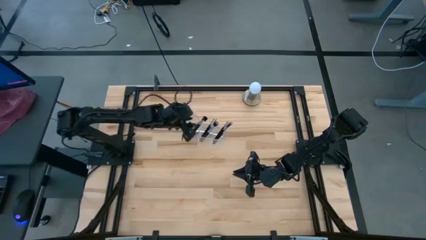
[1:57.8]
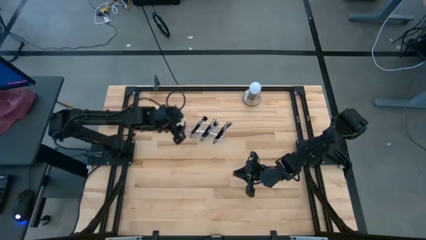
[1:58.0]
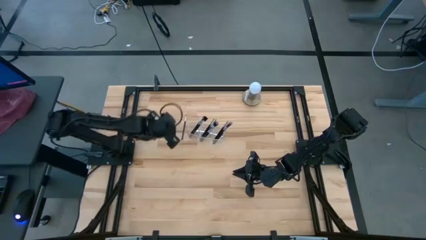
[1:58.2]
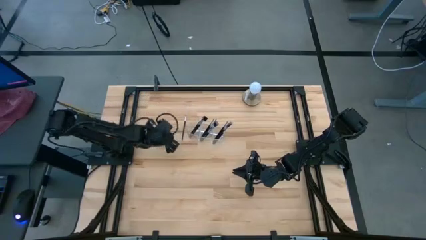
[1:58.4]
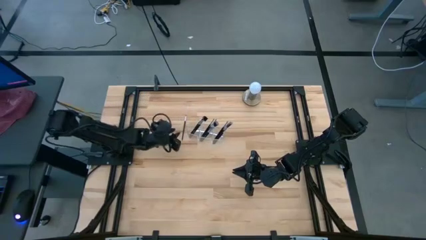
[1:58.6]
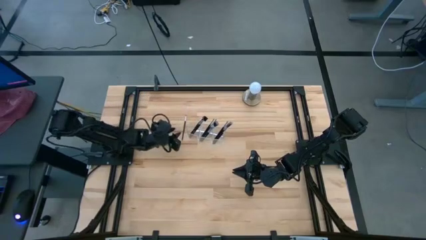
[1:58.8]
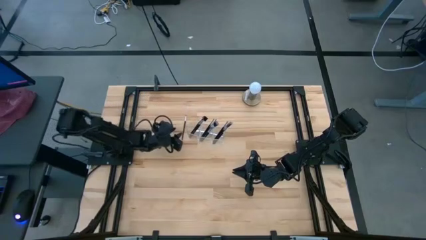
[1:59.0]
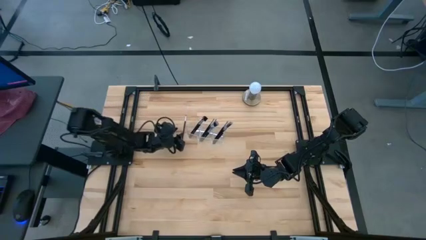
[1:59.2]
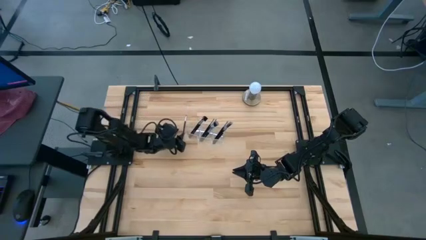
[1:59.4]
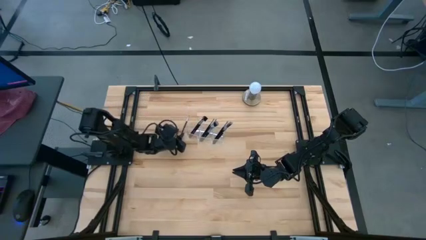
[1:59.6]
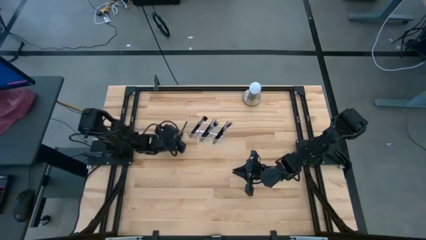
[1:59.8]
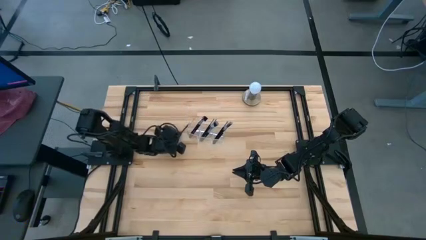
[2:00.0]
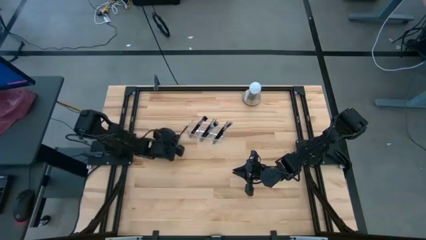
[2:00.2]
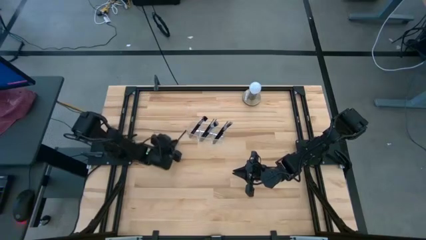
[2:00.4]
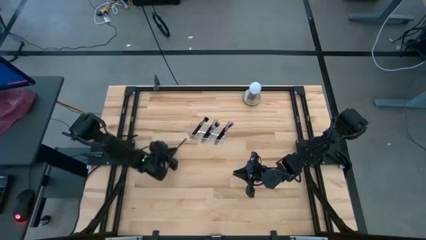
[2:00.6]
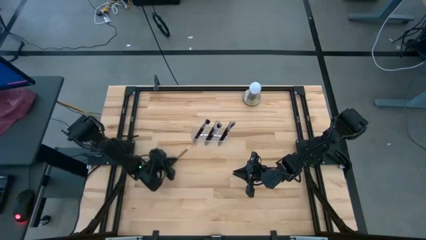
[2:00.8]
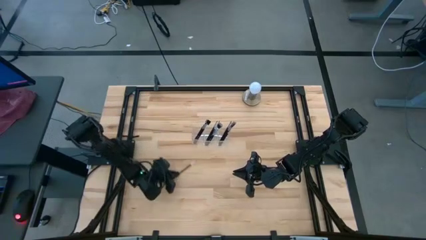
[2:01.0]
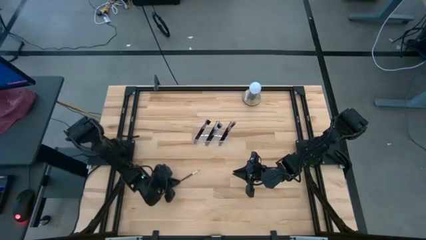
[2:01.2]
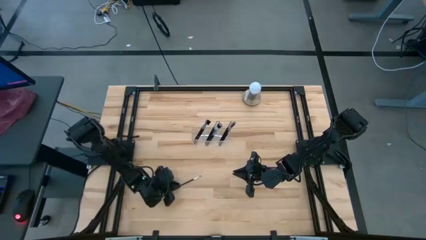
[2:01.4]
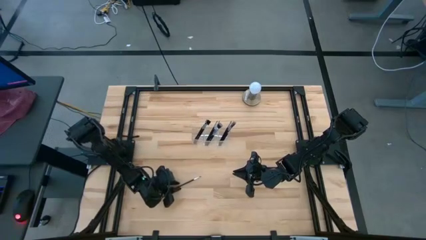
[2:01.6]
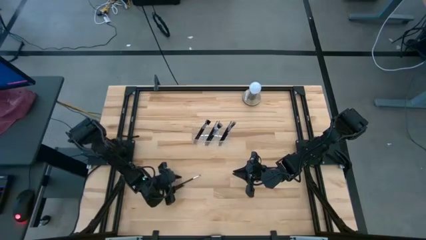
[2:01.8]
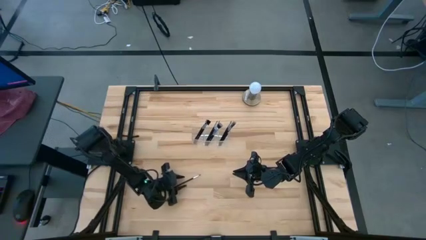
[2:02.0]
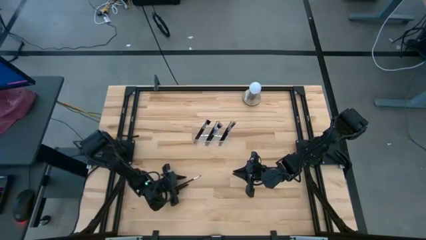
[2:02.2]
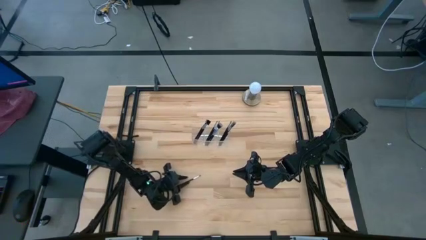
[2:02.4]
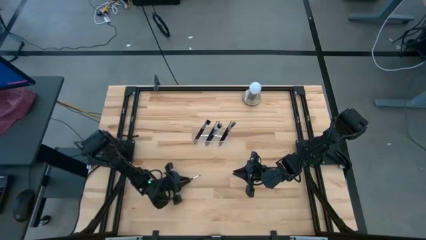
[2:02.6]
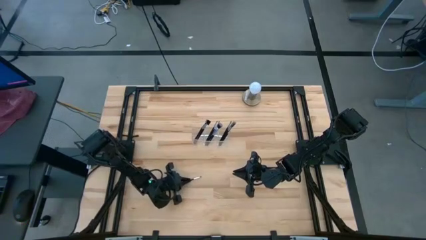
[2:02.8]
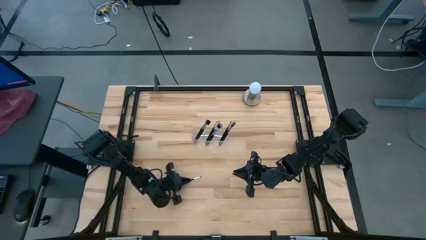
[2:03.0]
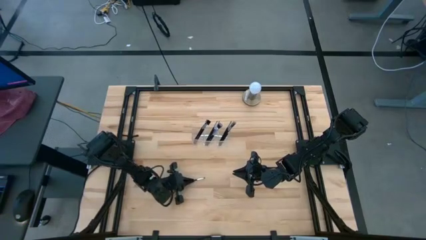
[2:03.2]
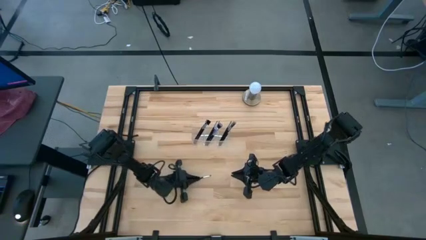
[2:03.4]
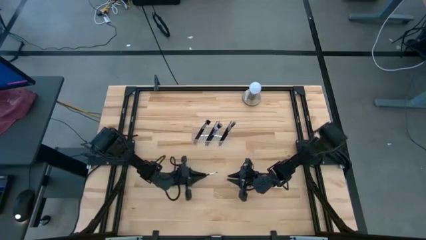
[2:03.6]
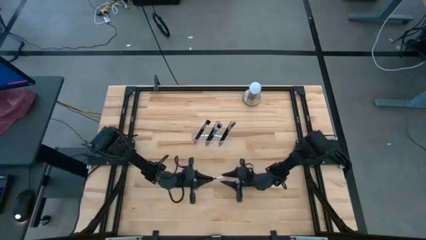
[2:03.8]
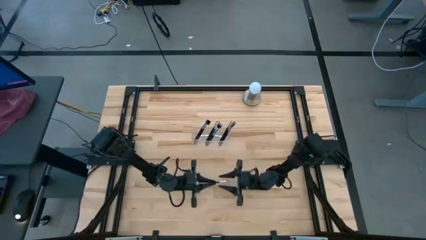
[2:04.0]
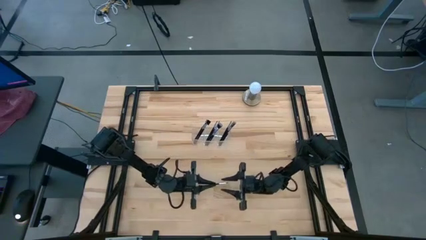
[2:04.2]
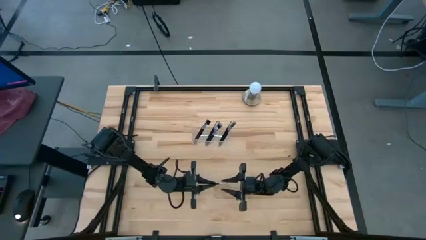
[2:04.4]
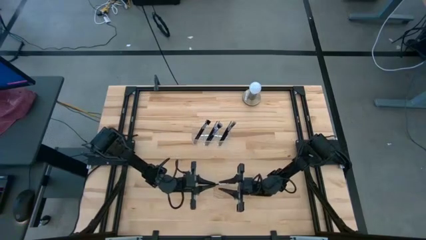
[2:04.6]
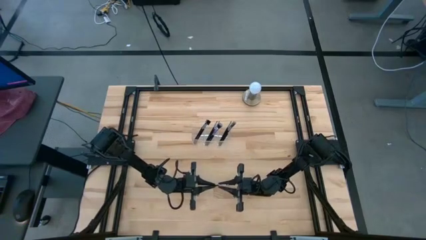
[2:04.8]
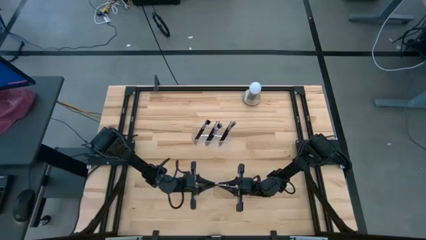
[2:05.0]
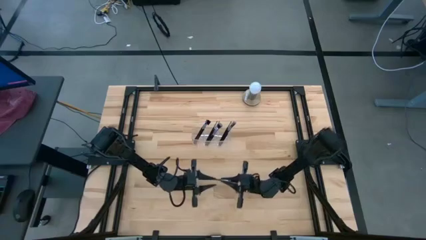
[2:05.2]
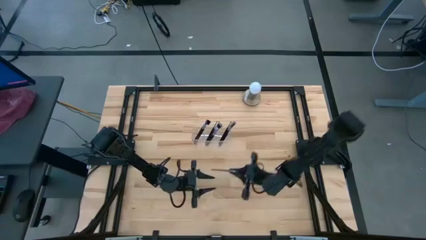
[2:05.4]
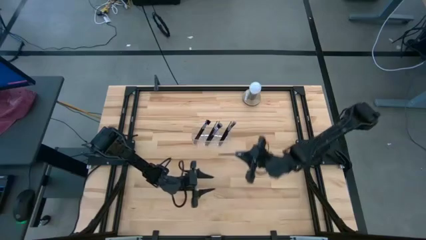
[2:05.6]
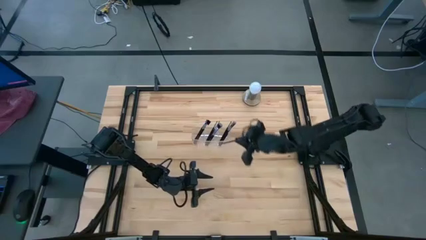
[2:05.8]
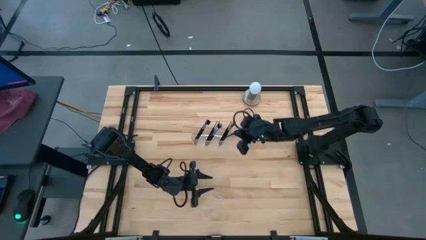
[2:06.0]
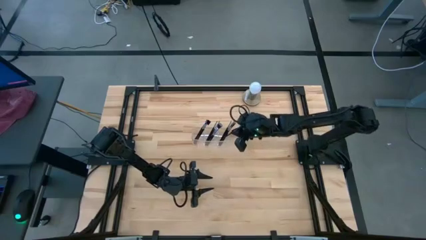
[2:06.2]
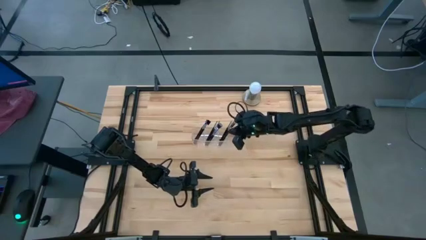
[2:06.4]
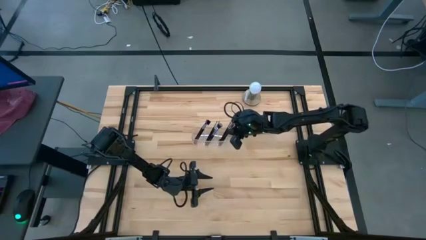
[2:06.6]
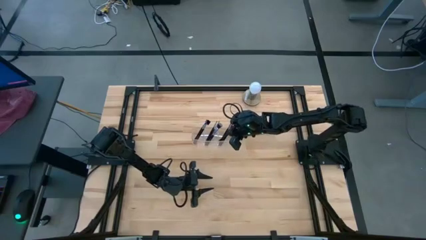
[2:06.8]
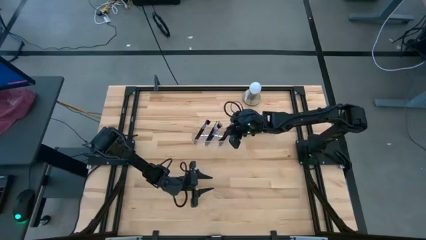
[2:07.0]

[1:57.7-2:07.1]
Task: Put items in baskets/containers
Put the eyeshadow brush into the transparent organizer

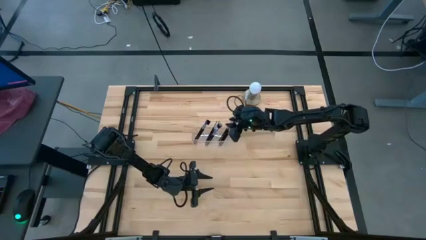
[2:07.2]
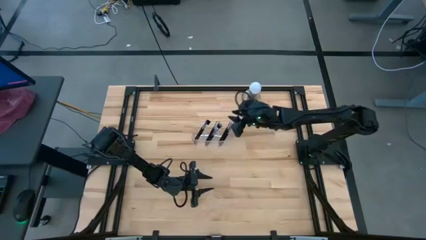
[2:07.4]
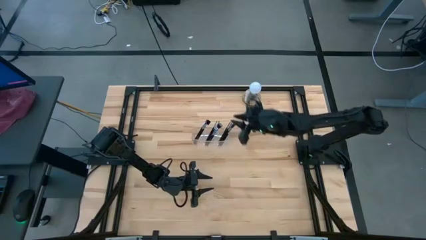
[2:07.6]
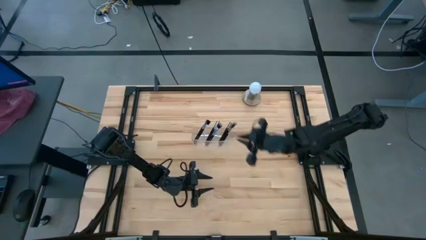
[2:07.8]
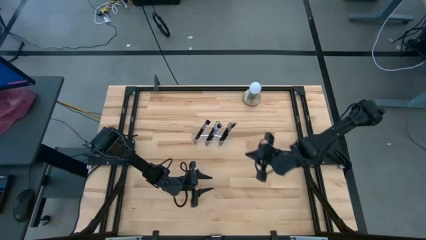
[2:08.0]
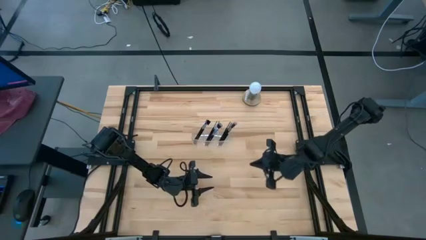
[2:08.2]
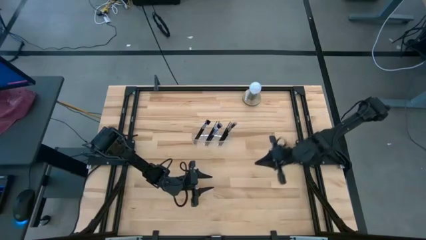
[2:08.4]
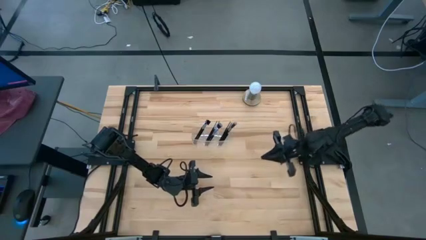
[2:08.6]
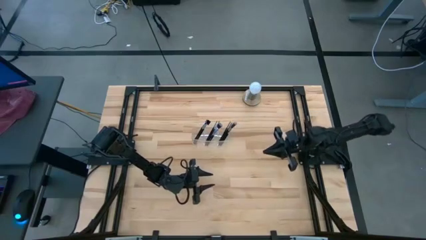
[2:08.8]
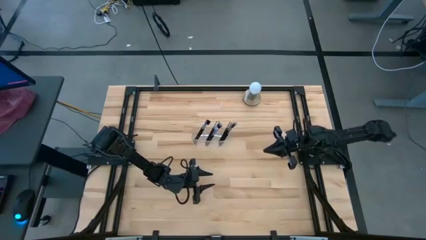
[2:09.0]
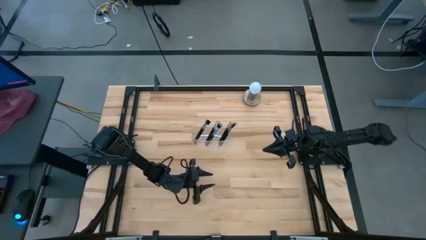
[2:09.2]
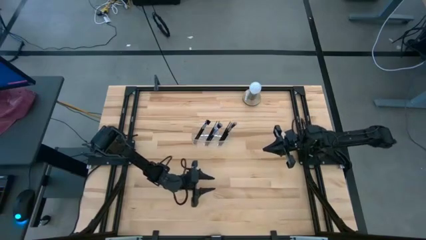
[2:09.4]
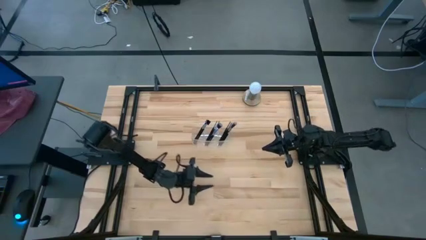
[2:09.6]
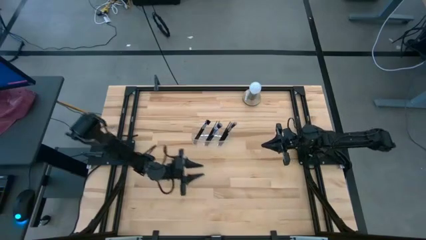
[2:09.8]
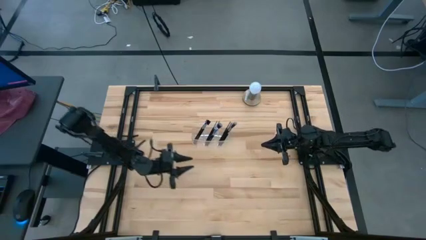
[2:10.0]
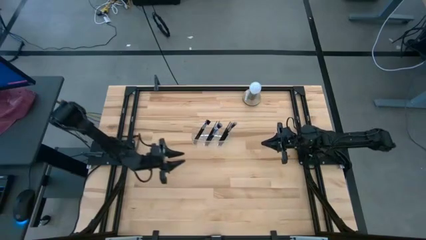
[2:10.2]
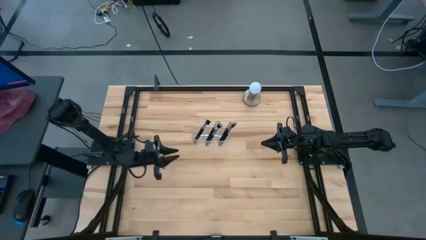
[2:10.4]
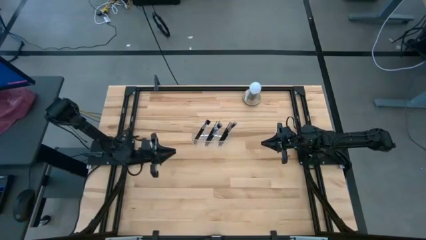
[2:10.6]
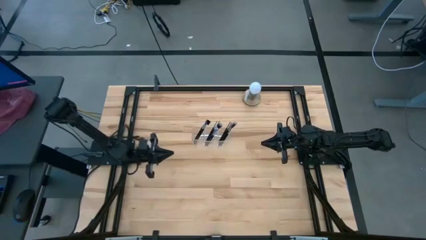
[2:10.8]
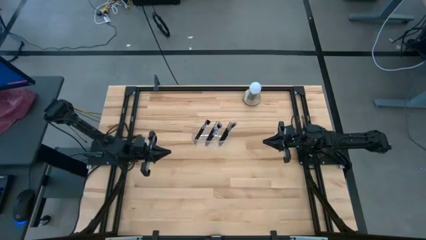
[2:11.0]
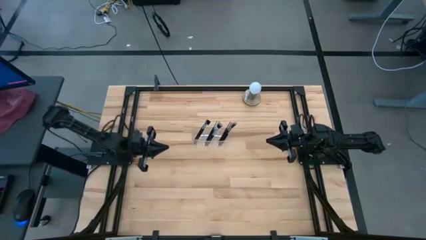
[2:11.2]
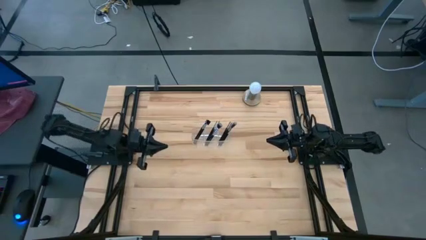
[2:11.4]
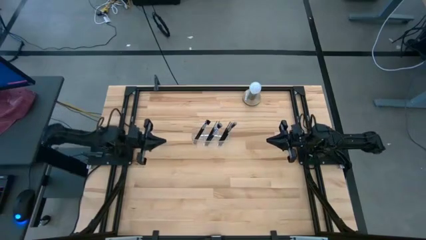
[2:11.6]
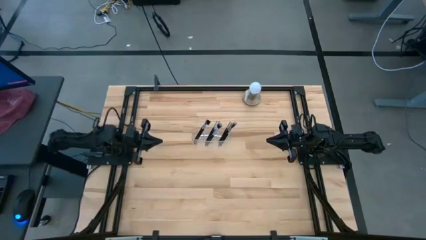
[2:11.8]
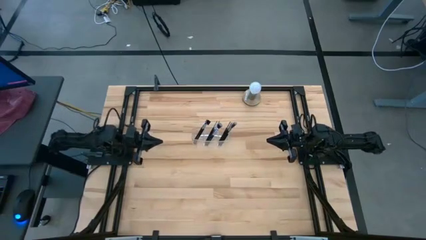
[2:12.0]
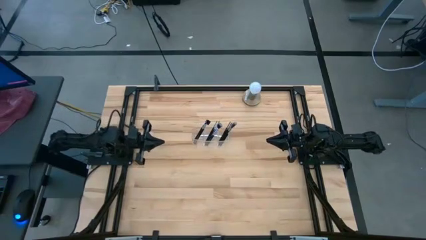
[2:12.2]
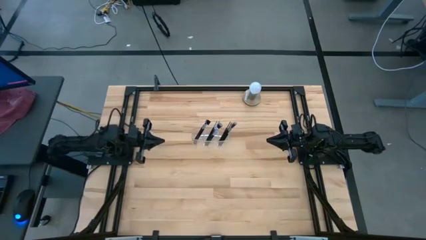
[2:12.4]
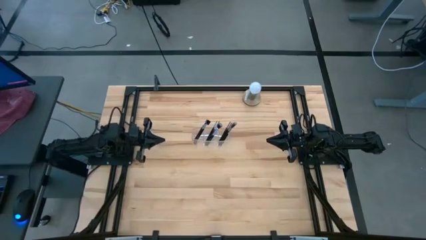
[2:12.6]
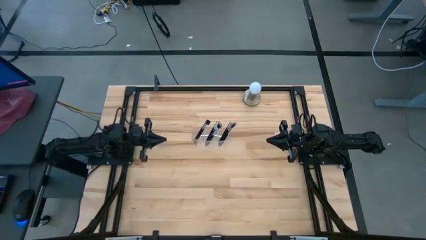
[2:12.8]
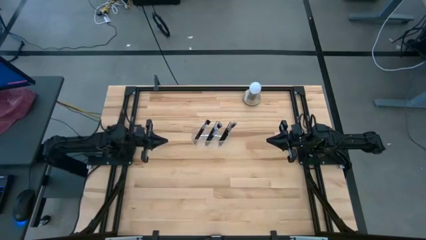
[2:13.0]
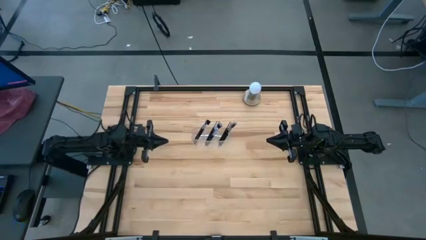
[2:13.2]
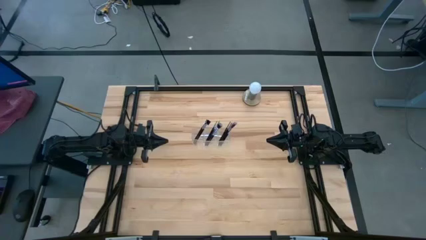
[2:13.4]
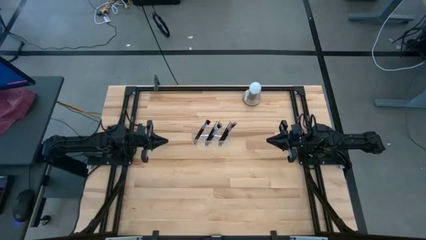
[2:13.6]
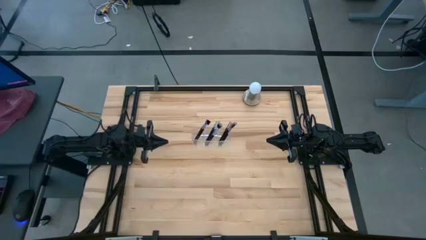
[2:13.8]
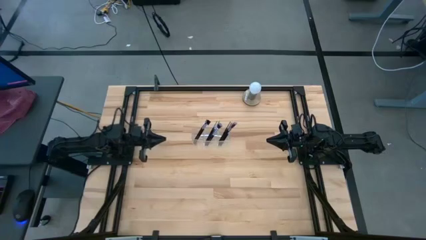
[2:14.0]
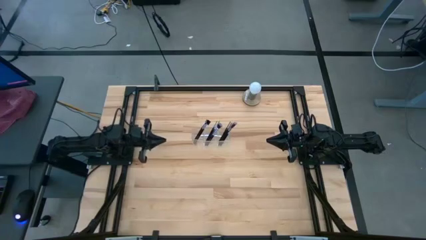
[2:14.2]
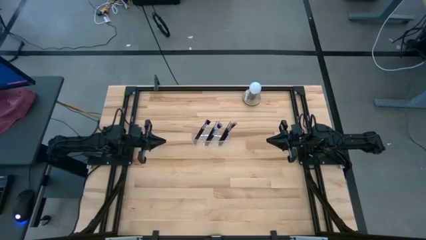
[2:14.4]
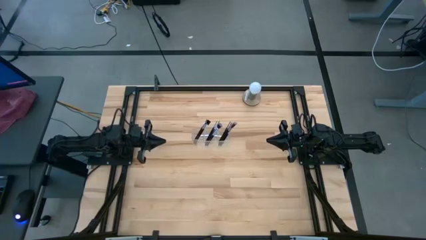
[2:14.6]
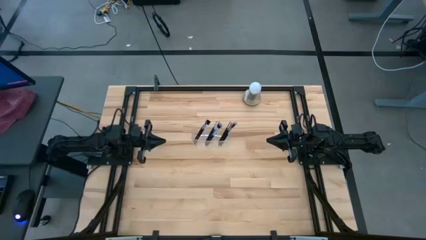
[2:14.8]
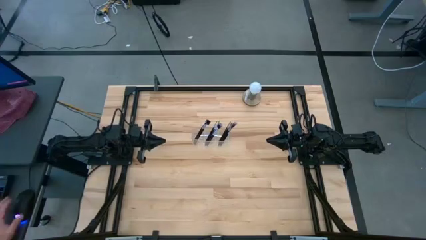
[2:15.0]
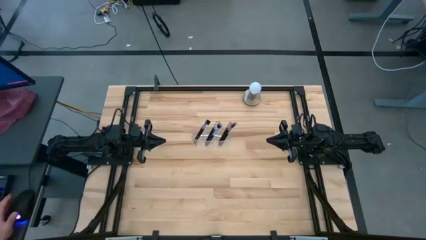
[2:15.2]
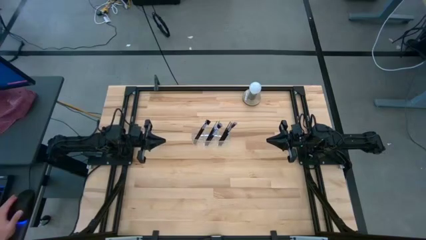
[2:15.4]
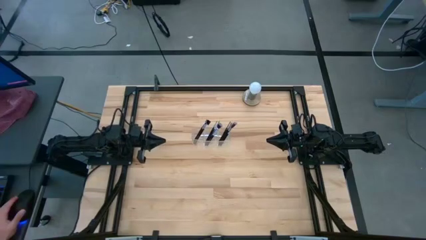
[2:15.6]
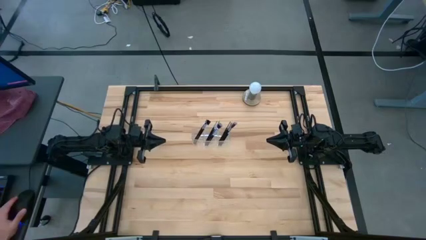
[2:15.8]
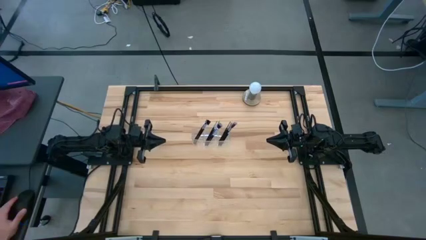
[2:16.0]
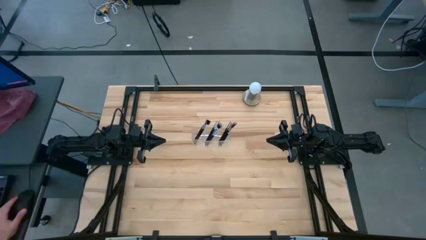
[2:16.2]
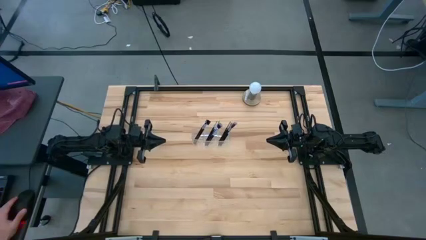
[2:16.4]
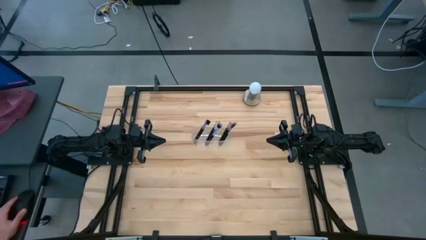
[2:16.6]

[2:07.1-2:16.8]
Return to Home Position
